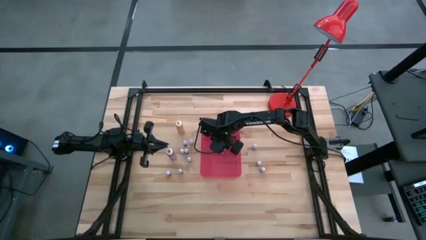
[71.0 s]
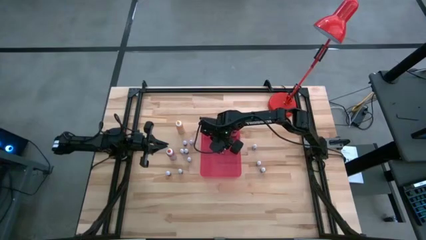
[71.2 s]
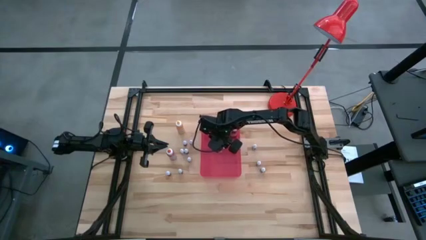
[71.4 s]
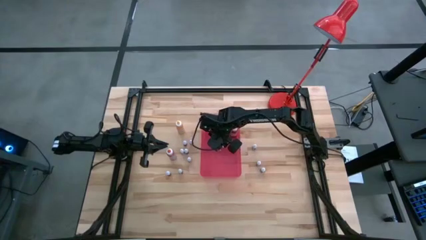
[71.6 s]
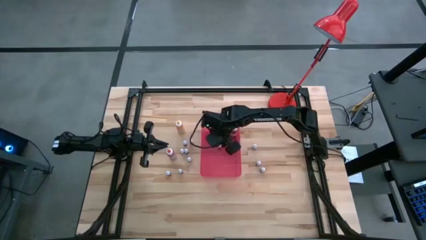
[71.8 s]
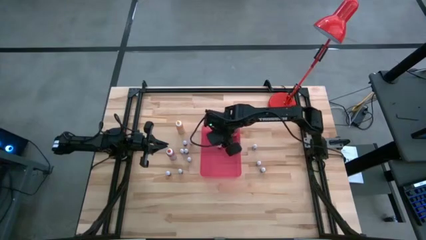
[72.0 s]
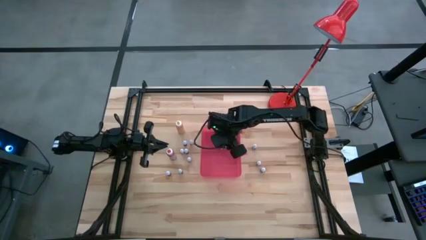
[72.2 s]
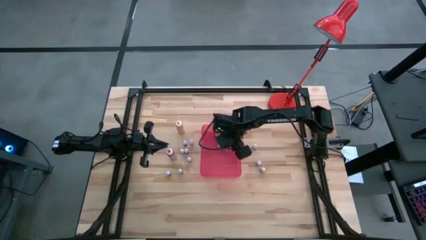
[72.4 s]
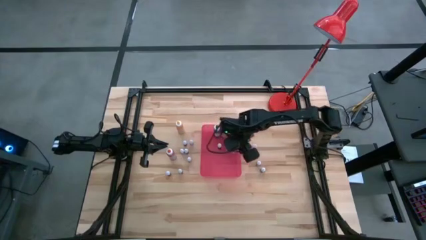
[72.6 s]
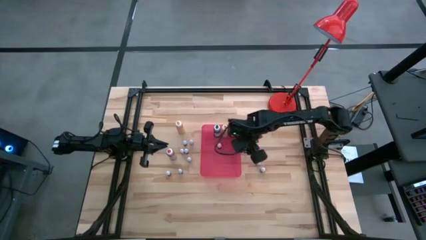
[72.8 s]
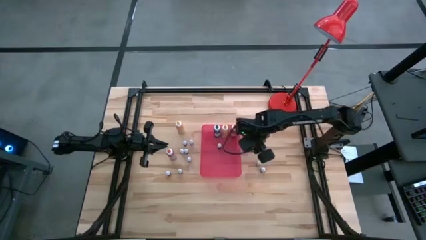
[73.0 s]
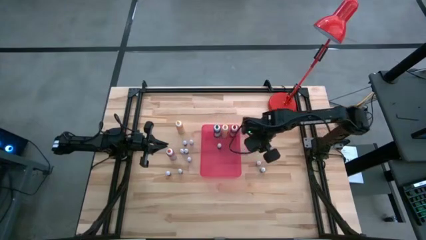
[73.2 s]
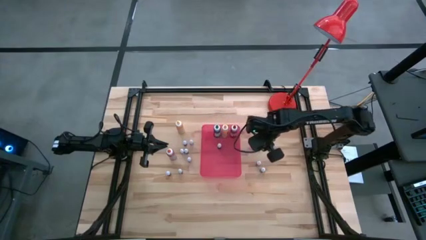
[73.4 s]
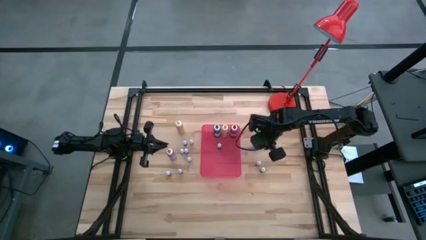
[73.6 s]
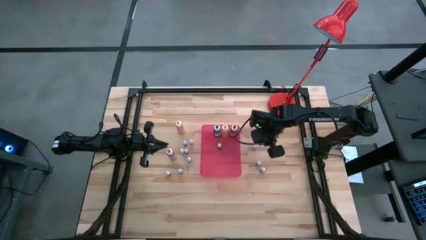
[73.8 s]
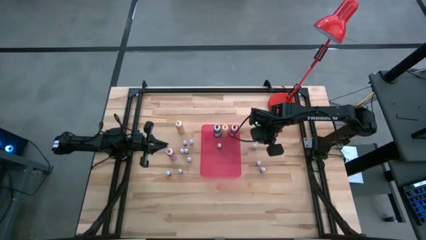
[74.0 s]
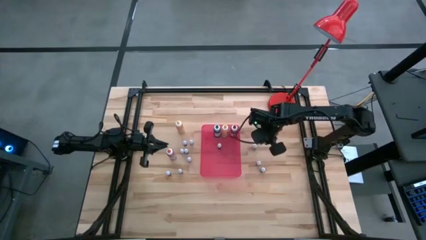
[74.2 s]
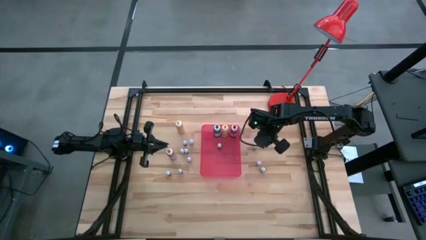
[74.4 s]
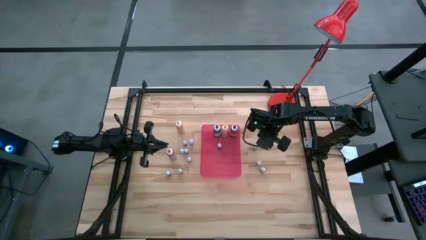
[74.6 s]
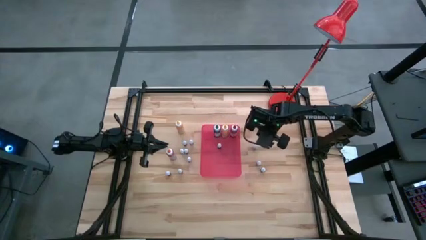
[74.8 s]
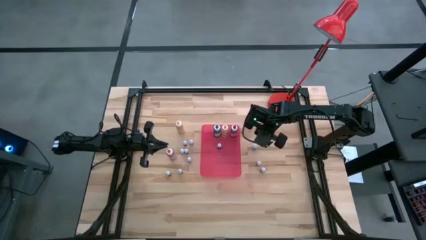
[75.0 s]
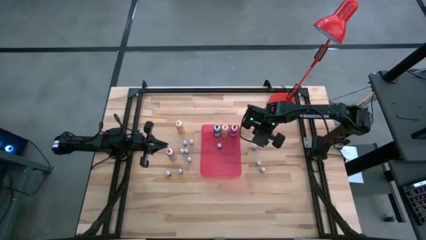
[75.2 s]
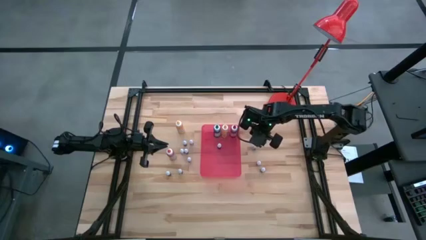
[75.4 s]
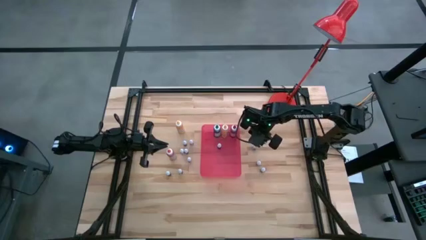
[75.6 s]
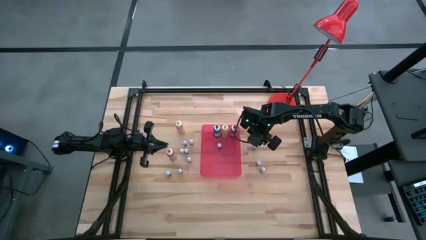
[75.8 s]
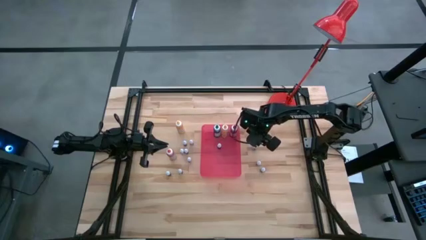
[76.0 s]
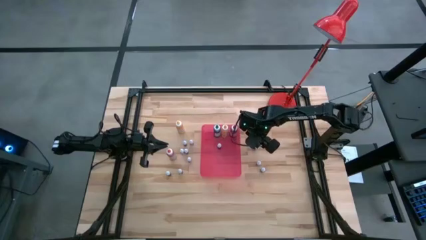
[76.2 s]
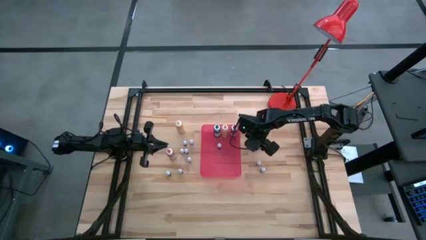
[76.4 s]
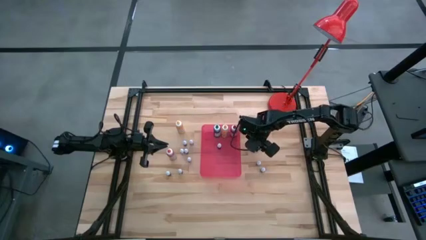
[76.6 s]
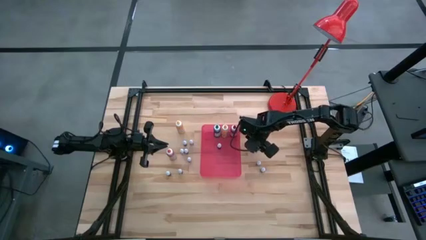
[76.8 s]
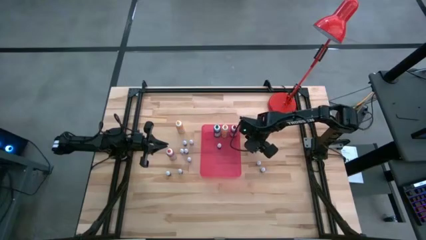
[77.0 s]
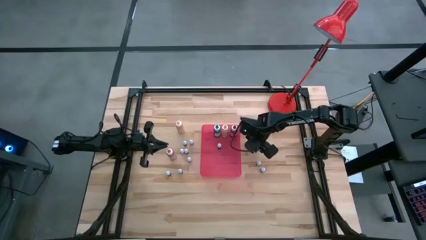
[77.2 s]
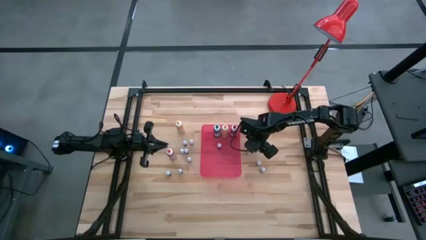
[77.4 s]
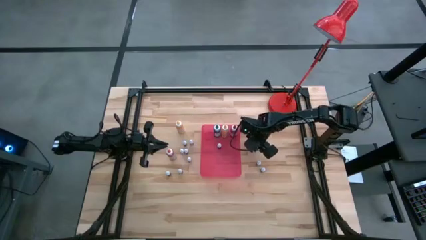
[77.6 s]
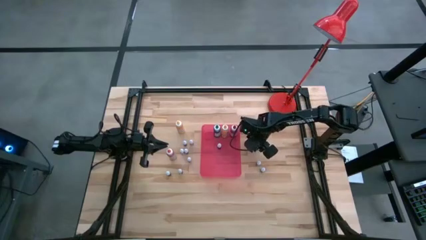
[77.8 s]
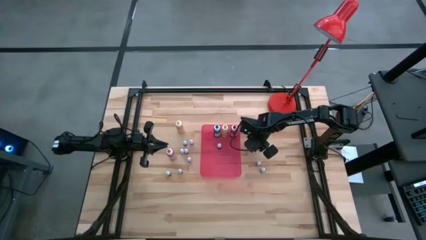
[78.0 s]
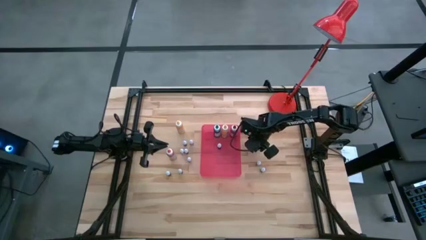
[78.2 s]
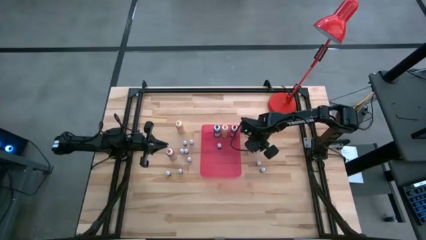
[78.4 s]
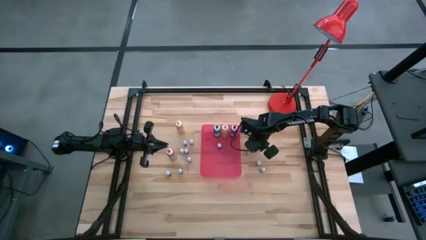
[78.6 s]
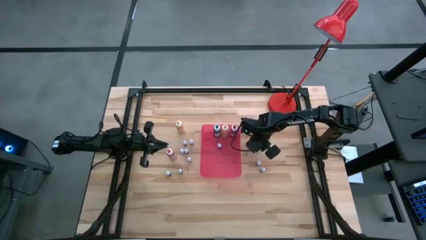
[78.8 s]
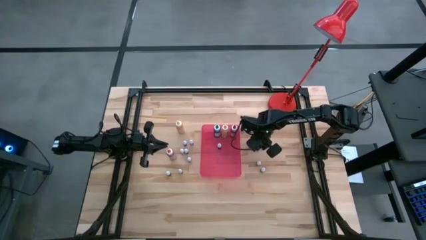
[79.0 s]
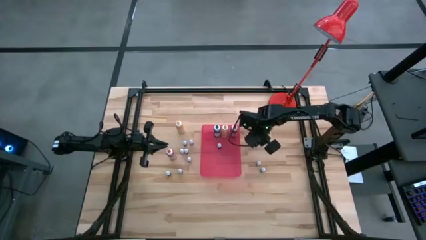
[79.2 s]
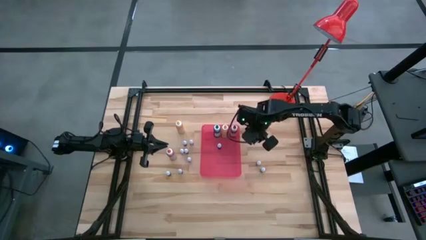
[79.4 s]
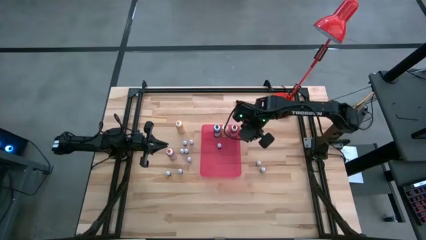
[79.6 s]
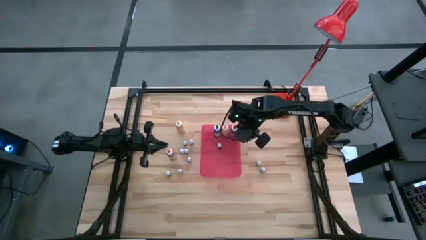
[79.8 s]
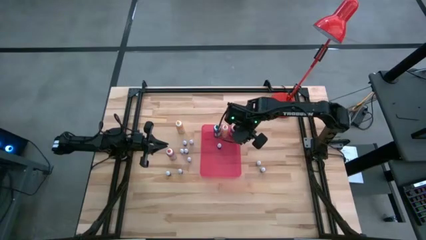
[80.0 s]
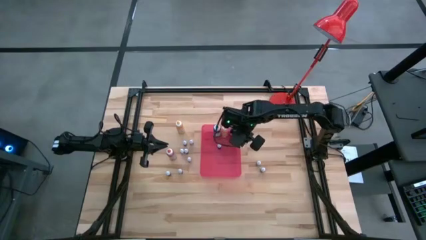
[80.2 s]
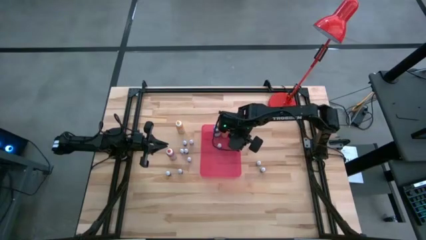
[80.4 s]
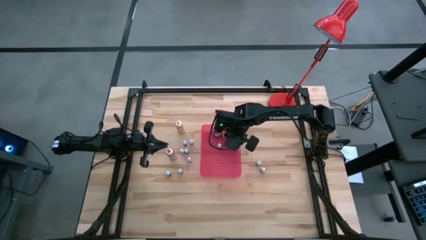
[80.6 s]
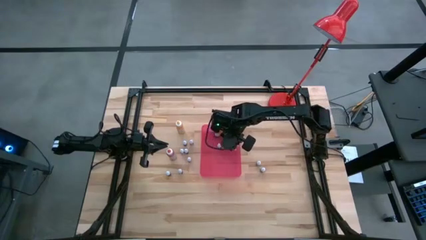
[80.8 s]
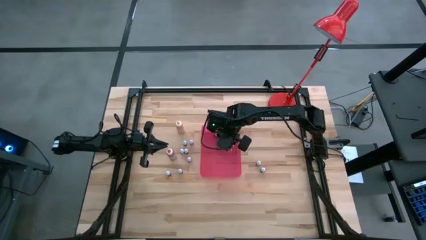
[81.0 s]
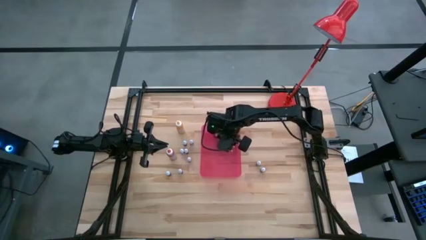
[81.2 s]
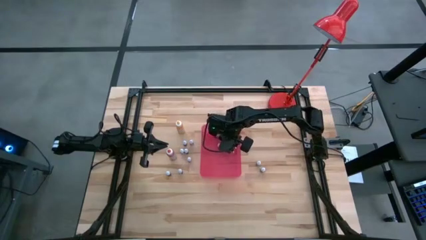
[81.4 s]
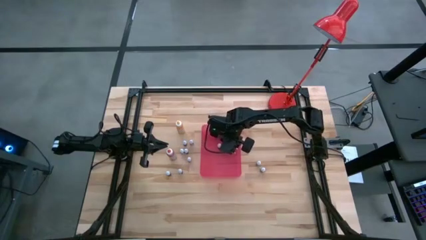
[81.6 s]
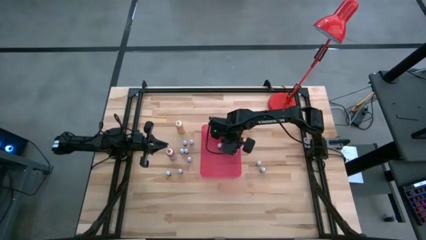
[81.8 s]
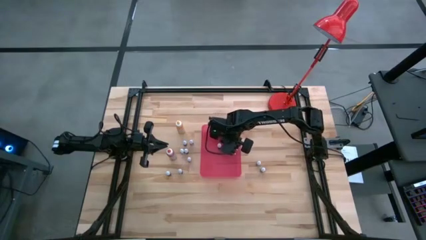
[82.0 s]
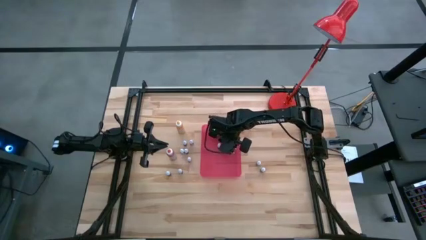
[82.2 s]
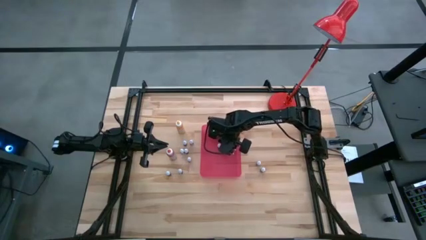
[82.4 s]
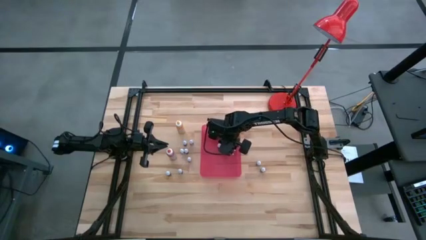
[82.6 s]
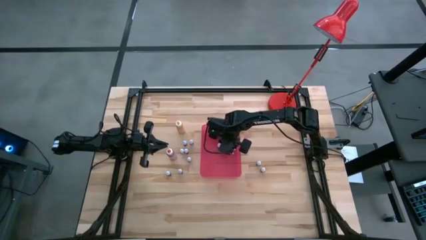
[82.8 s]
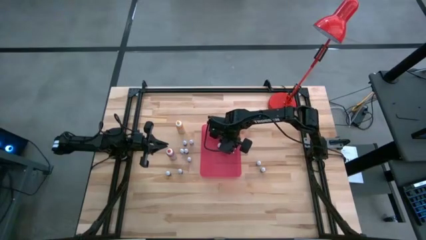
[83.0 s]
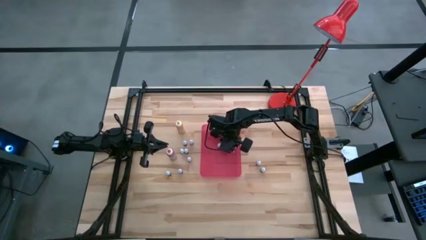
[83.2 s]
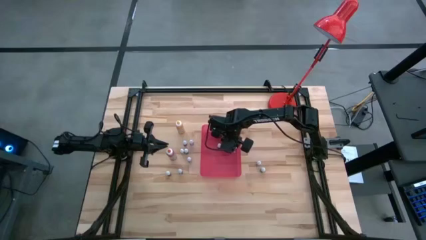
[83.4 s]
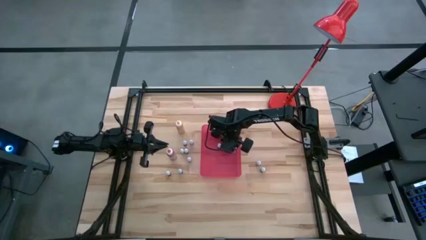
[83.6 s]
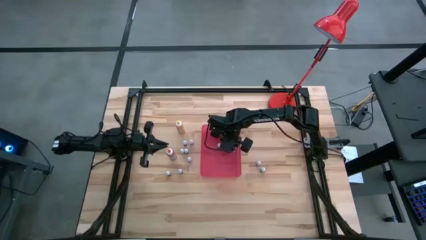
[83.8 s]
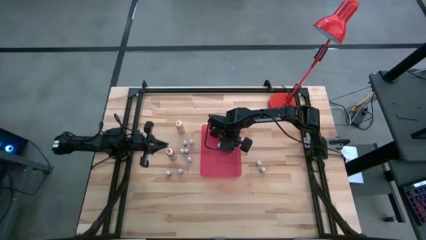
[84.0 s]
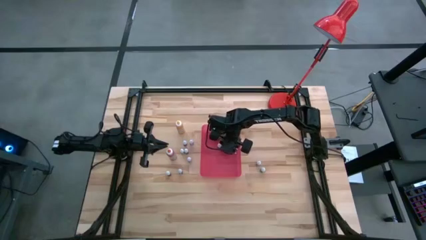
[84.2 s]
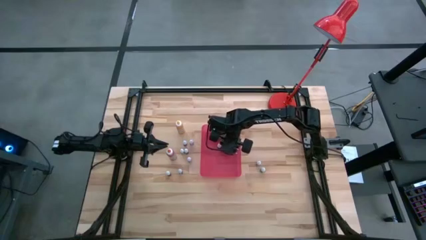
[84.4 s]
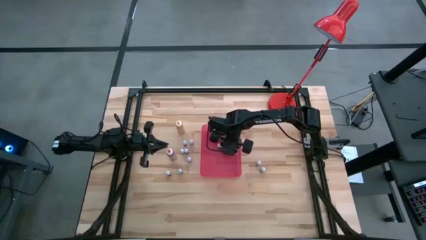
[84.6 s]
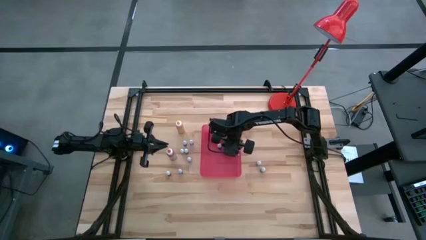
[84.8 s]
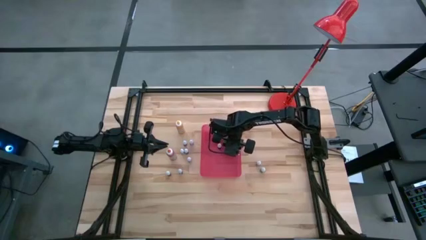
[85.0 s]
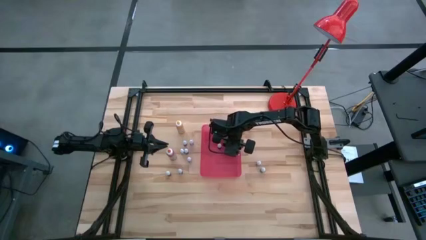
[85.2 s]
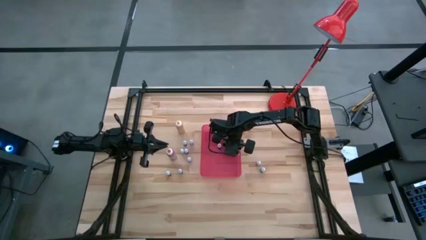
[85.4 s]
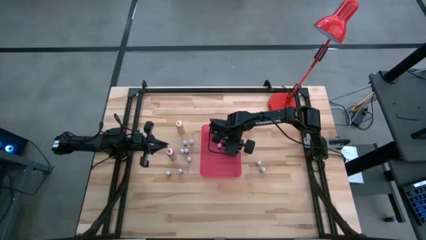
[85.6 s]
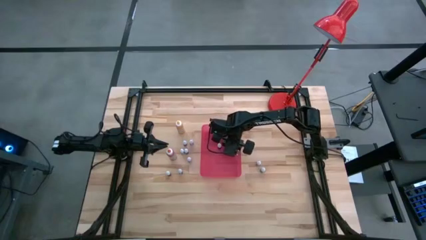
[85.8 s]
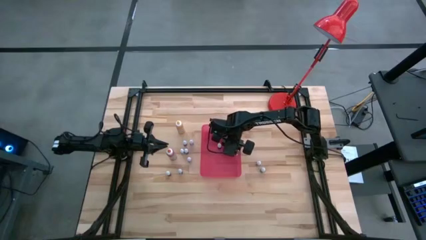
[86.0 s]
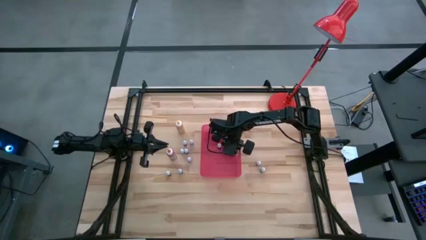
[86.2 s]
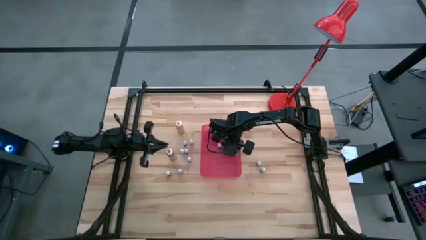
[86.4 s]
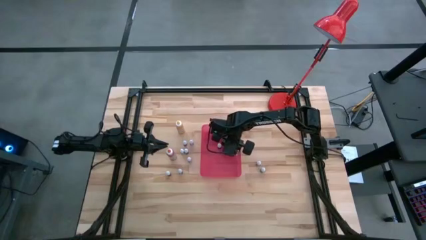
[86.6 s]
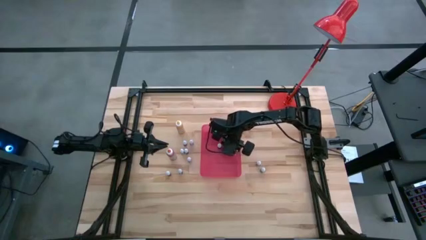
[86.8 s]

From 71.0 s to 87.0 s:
Task: Pick & Place food coloring
Put the small food coloring bottle into the red bin

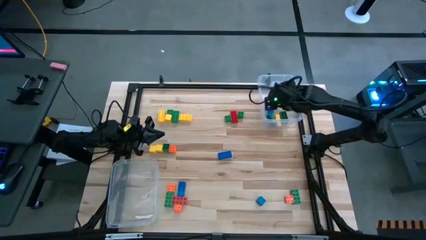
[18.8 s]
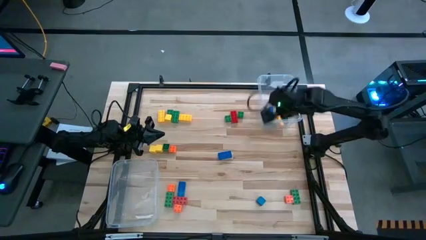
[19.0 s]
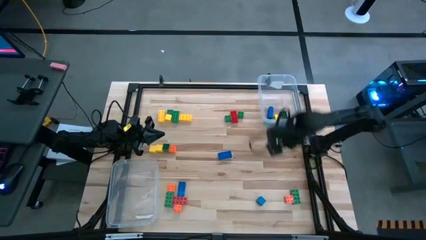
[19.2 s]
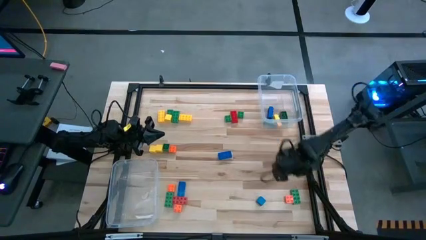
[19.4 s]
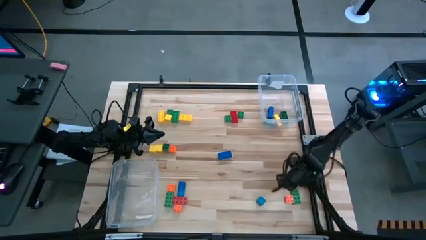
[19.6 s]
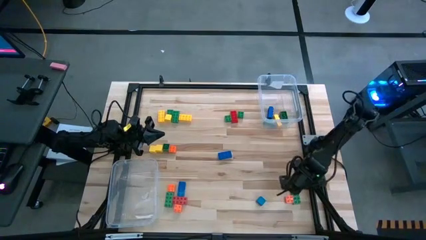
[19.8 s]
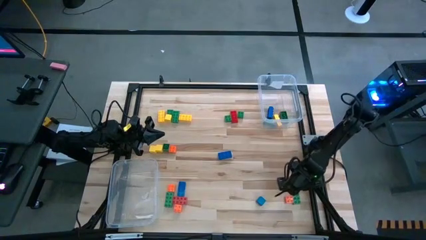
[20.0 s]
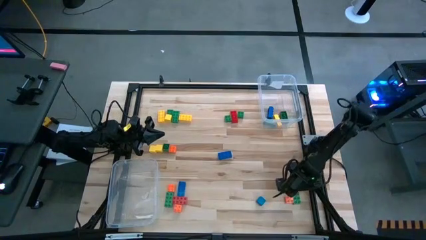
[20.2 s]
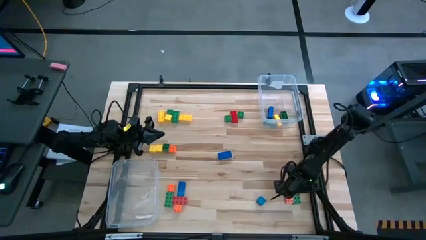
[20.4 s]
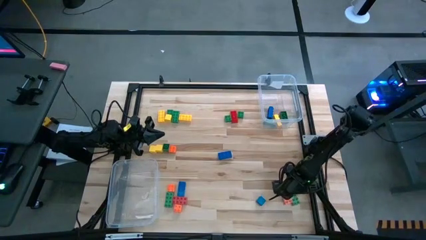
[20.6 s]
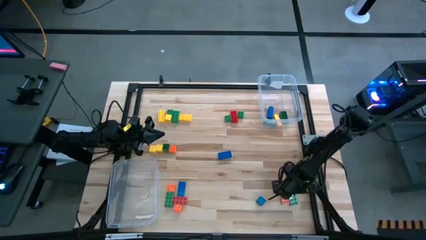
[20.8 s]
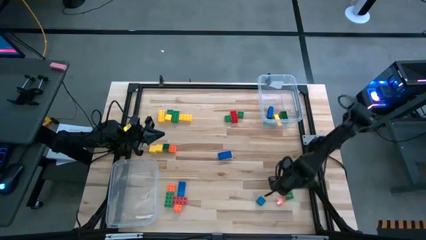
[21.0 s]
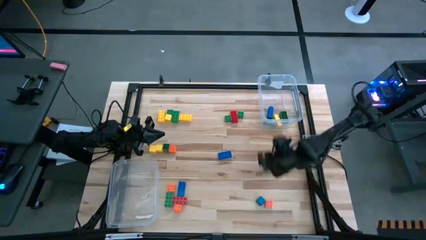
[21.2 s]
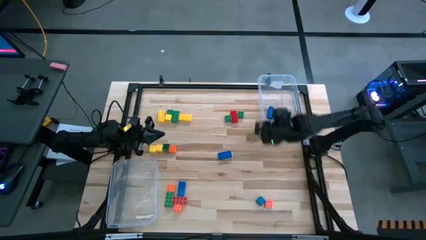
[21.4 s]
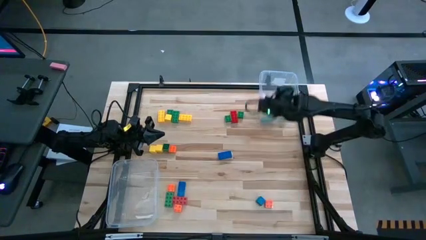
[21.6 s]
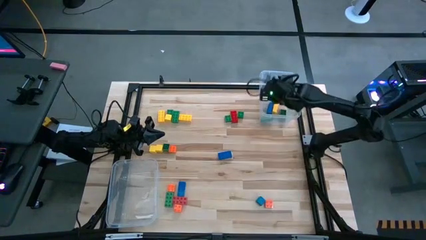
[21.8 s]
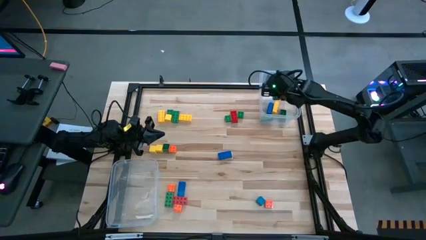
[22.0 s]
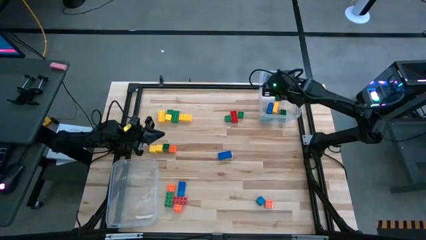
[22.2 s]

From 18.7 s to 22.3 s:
Task: Sort blocks by size
Put the bottom right large green game piece into the right transparent bin
